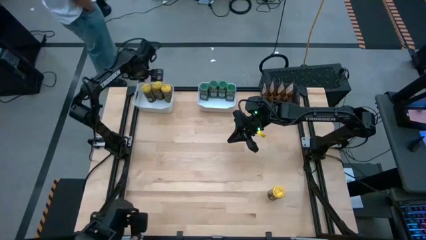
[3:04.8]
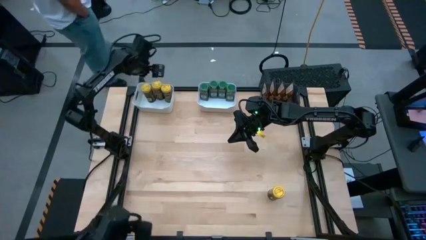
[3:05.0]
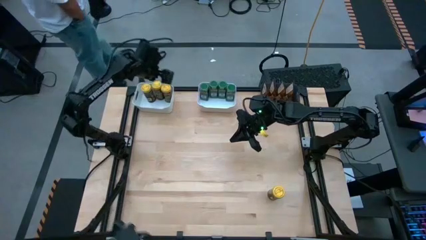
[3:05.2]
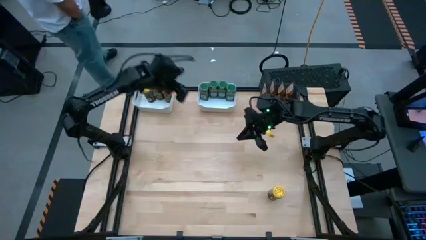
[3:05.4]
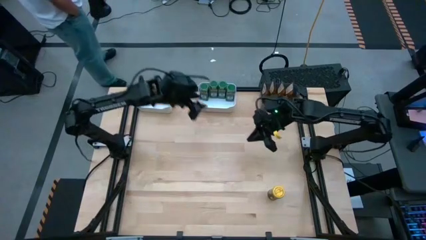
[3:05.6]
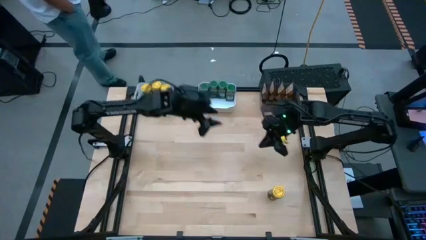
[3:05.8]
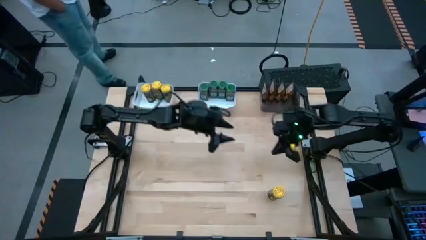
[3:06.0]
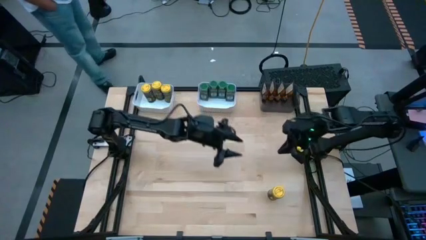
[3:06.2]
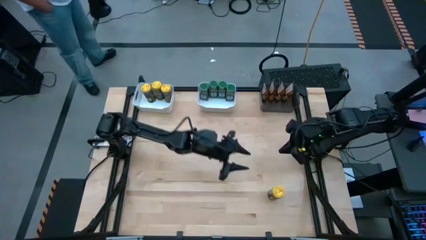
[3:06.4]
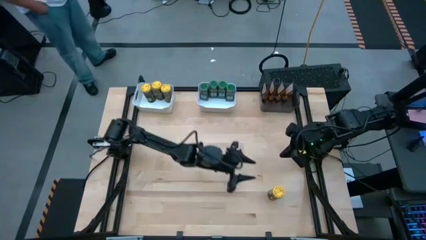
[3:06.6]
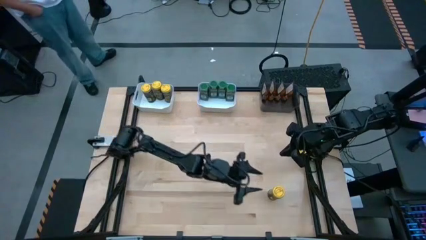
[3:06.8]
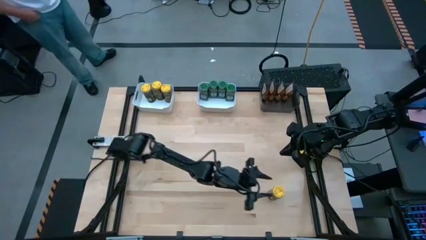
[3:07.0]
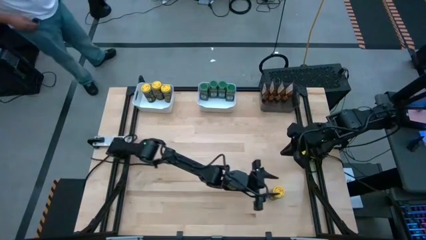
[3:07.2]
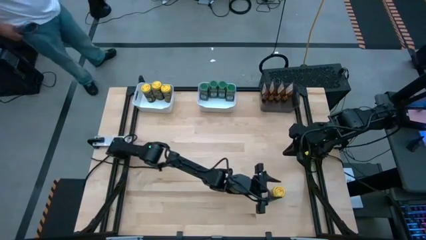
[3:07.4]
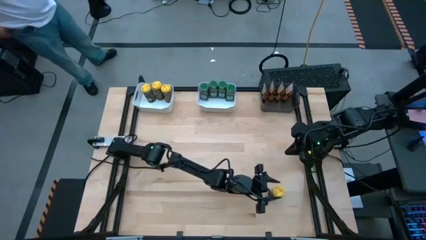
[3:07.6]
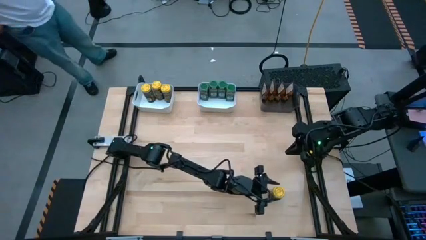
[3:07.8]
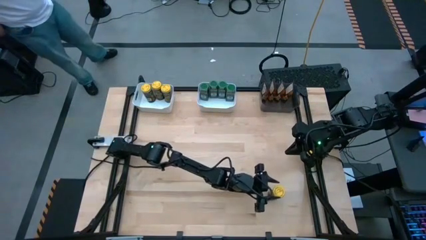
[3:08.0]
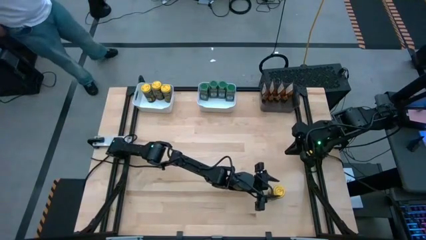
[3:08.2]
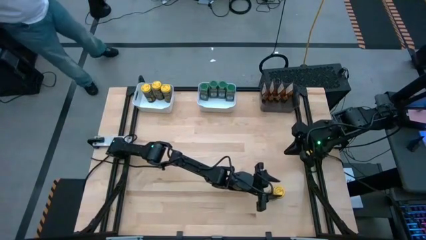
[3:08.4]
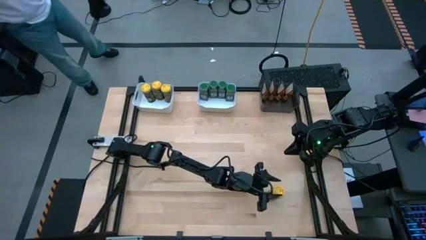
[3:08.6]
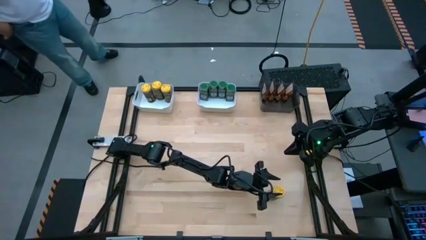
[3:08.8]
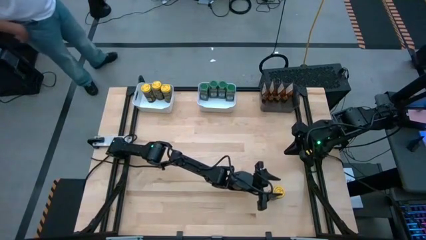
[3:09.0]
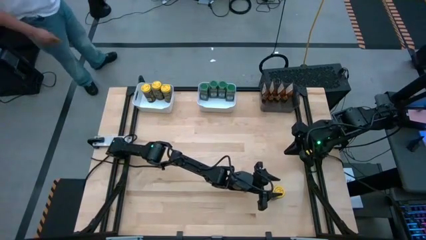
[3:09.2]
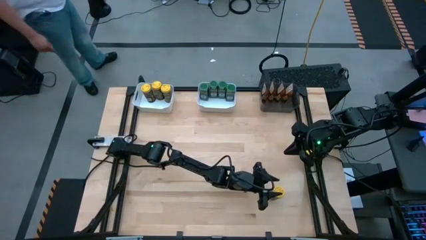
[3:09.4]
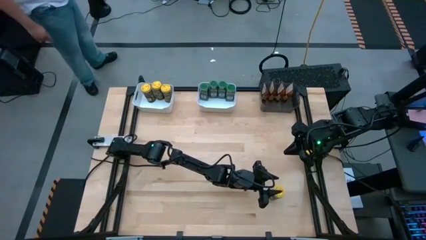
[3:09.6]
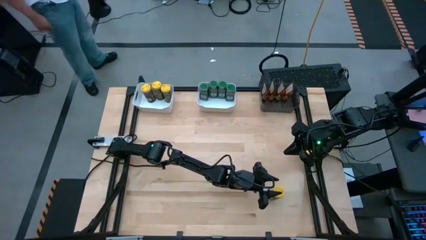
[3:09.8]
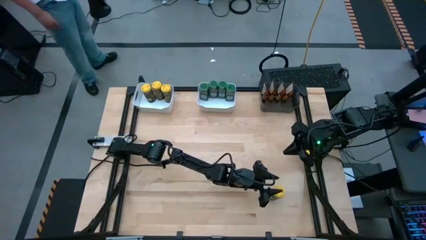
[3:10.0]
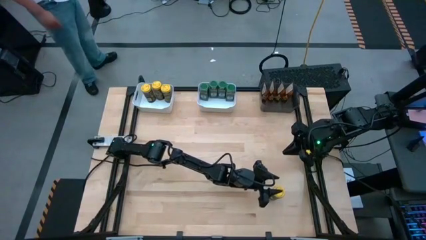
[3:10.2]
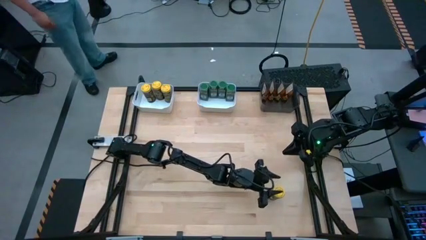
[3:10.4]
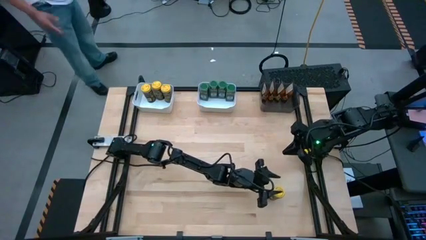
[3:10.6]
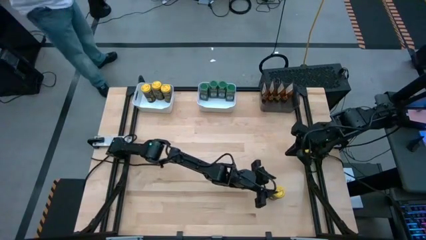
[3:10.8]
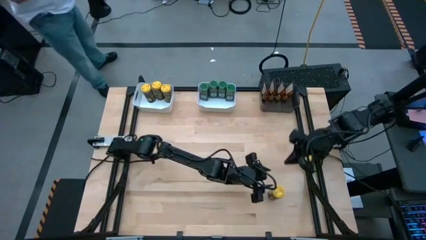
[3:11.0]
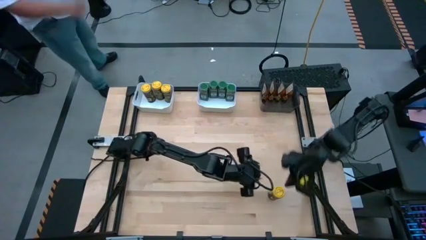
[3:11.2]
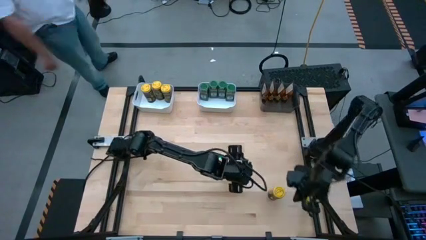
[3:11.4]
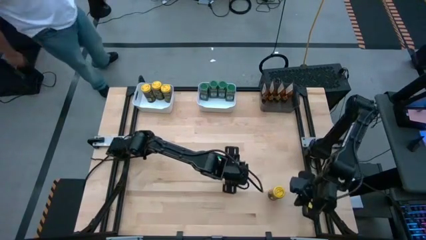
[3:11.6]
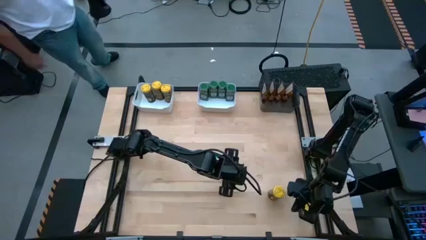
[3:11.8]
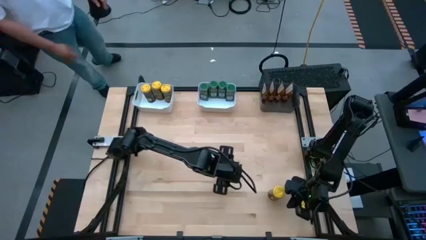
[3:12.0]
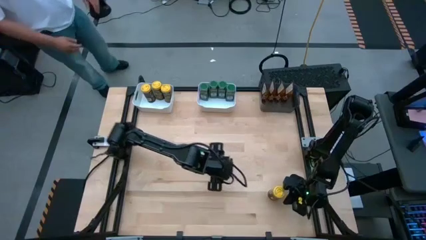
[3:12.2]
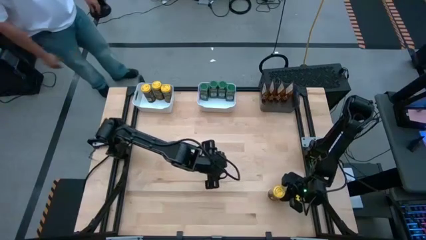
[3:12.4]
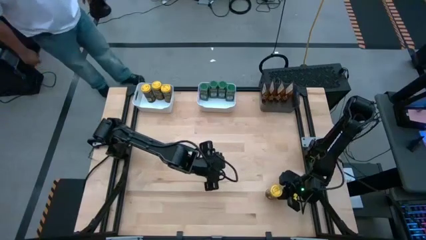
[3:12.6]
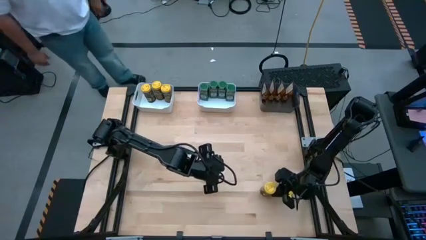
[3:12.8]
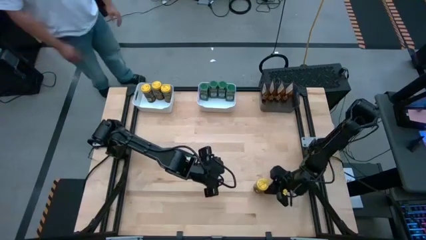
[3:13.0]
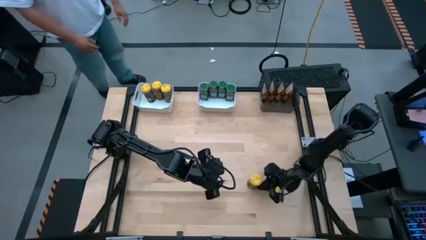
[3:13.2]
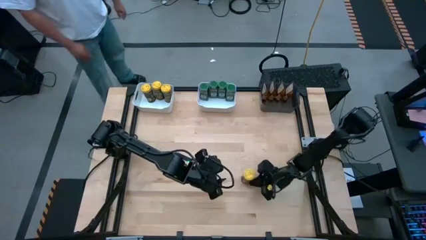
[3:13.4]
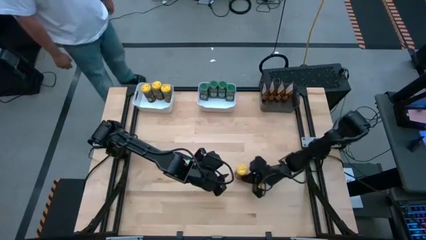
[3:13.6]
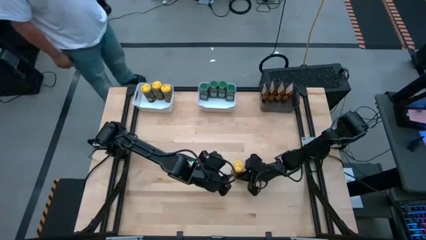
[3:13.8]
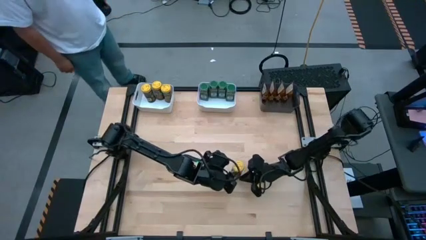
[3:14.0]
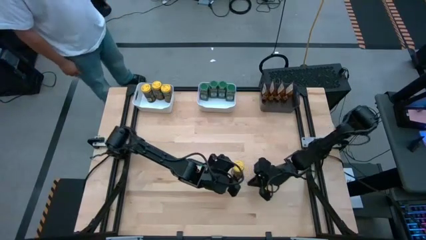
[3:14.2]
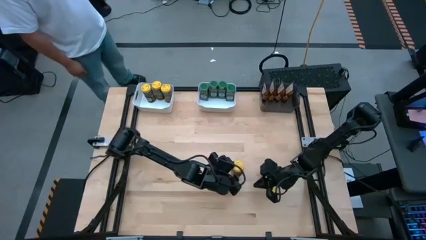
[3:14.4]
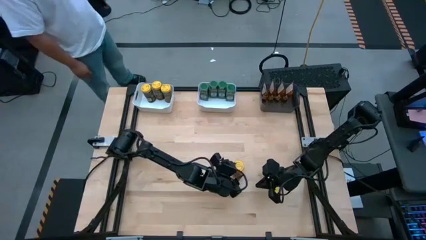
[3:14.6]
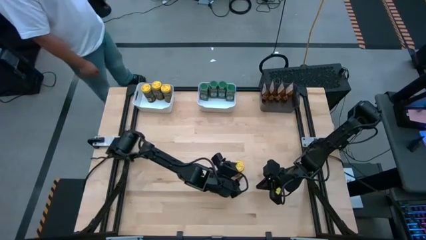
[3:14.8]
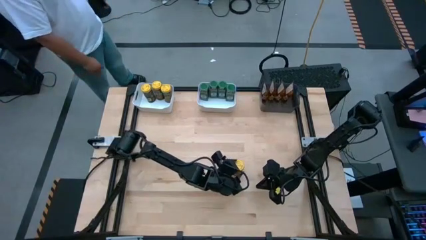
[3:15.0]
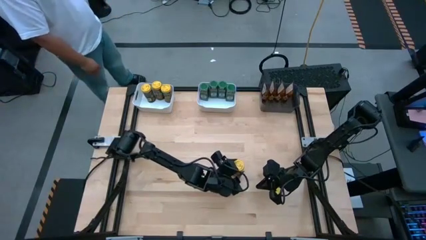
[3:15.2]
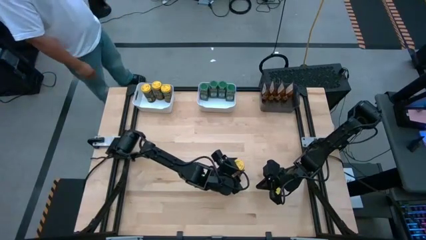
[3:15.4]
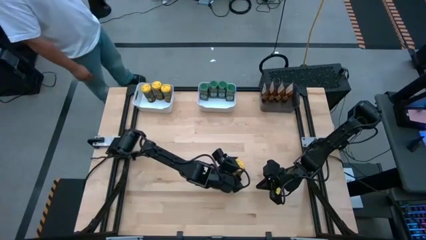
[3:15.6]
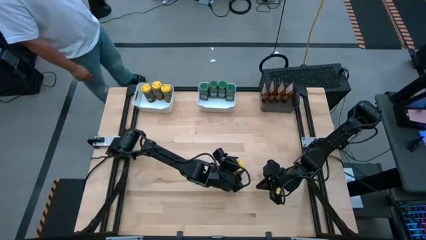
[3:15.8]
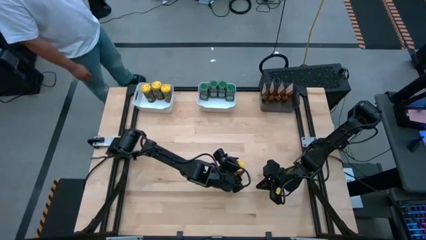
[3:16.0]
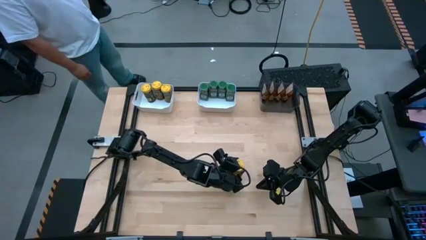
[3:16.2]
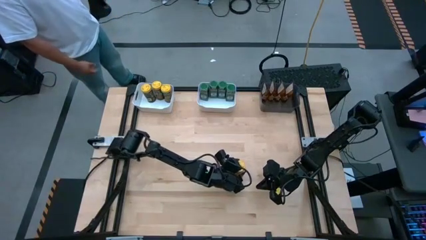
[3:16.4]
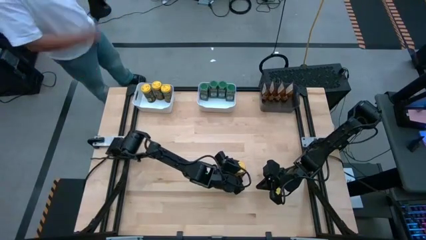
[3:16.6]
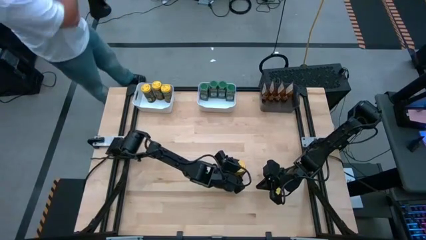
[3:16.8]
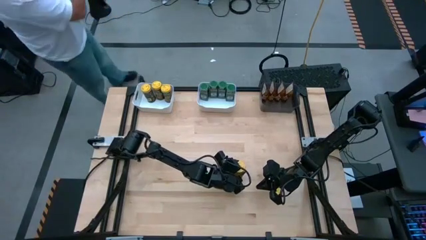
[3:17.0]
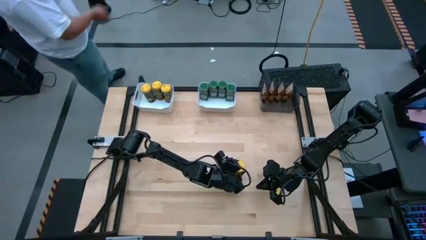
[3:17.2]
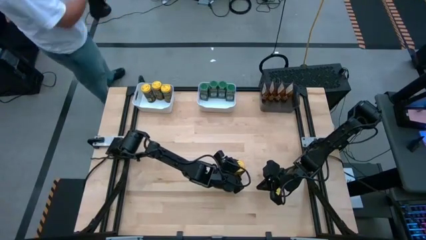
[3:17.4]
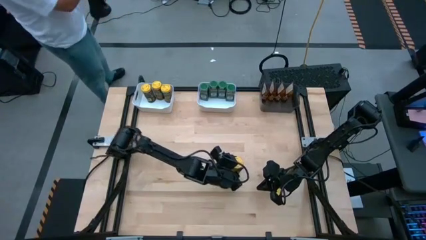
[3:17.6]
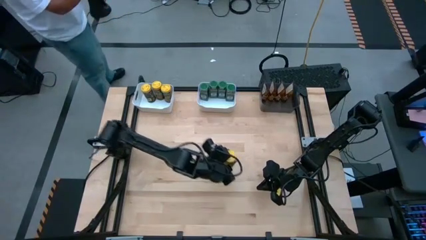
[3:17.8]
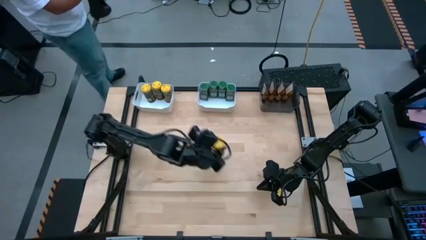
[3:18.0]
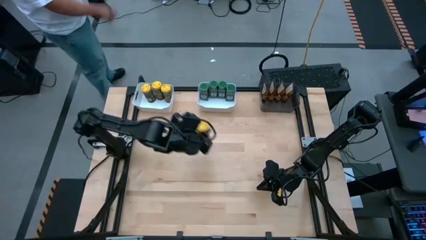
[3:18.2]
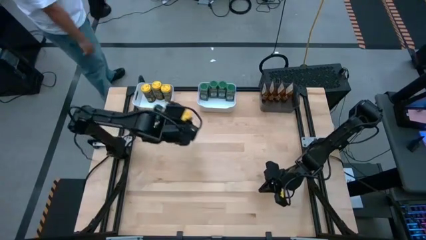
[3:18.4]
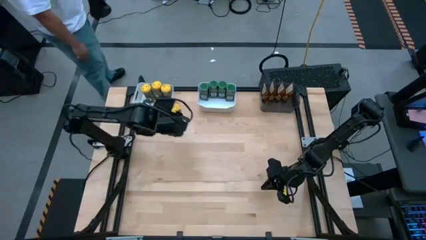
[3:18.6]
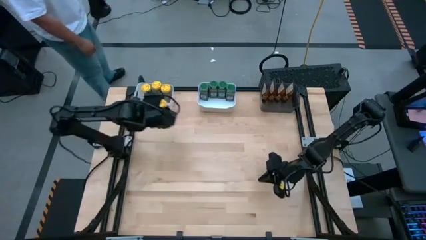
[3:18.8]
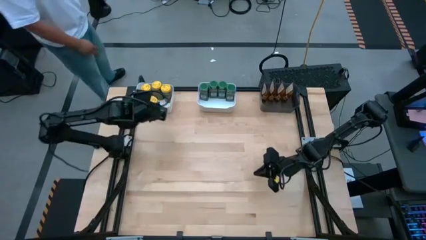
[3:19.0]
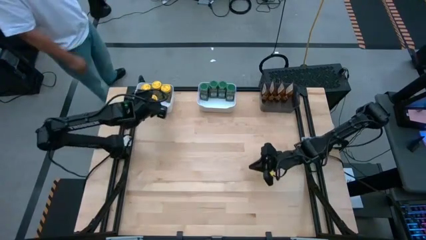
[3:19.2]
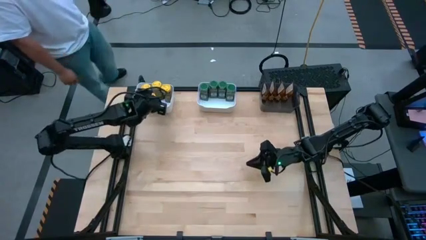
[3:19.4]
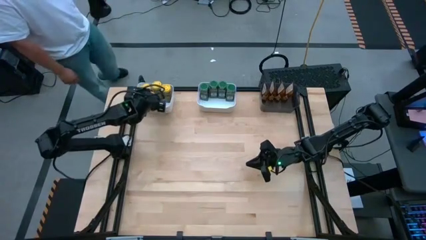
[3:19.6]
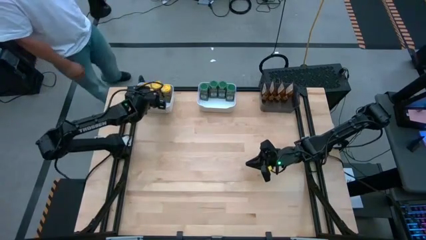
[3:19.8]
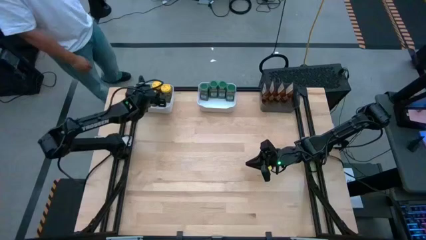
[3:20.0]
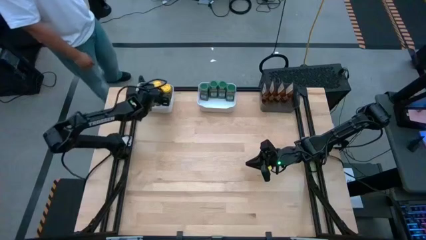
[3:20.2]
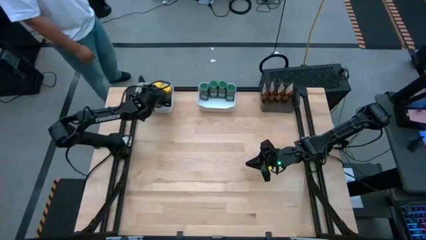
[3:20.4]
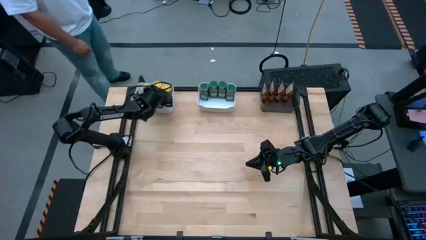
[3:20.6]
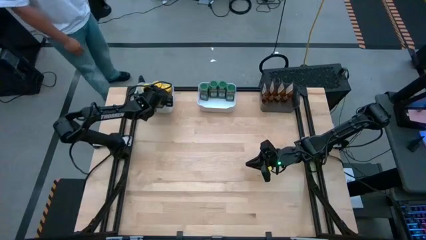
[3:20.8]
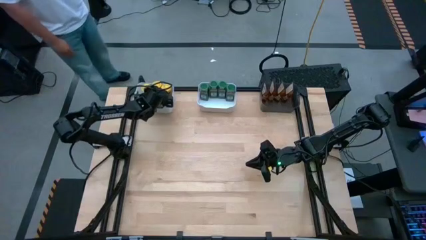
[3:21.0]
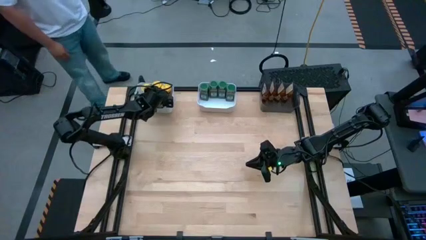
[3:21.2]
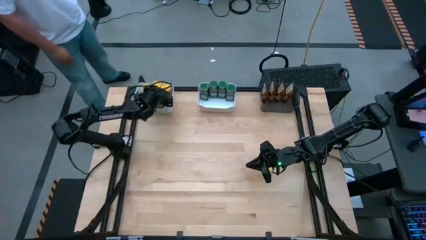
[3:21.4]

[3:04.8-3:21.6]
Task: Sort spices by type
Put the yellow seasoning bottle into the left white bin
